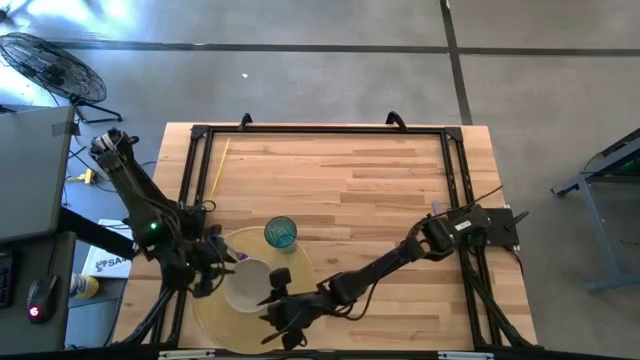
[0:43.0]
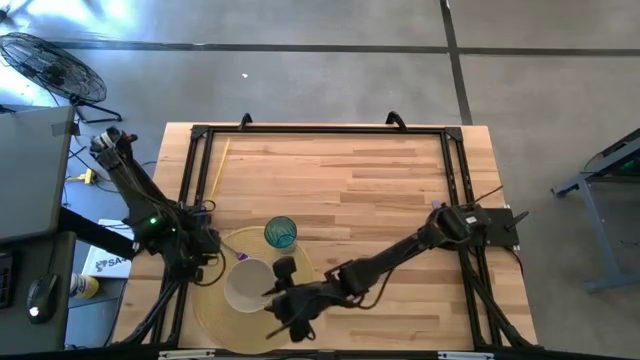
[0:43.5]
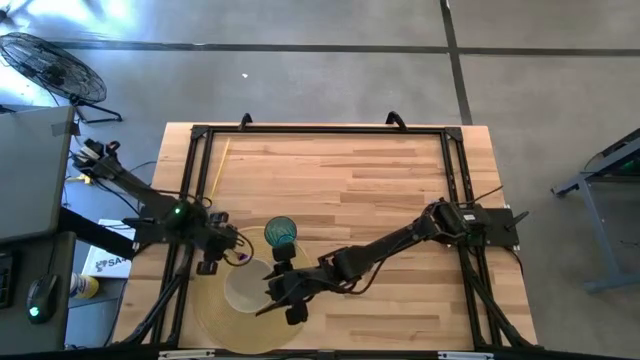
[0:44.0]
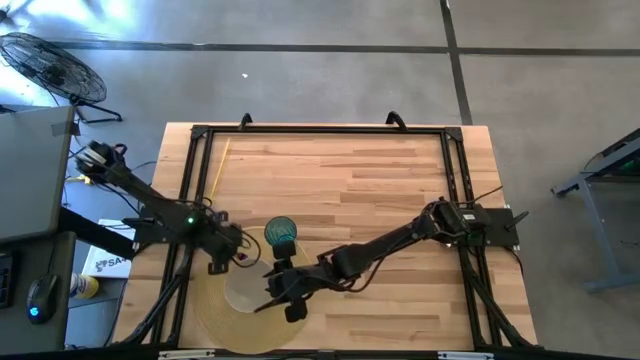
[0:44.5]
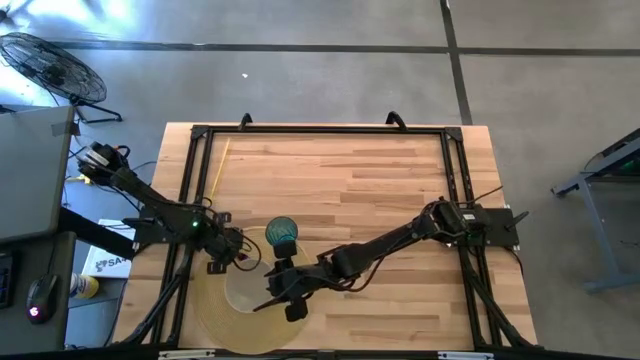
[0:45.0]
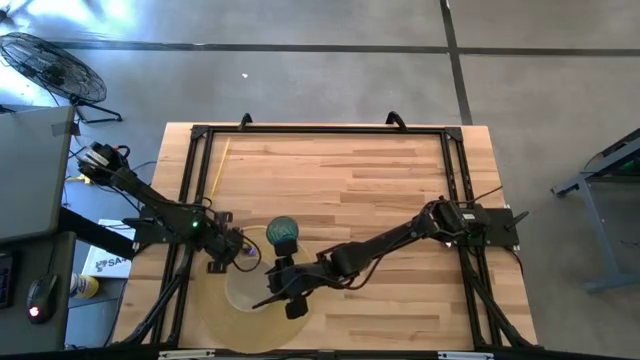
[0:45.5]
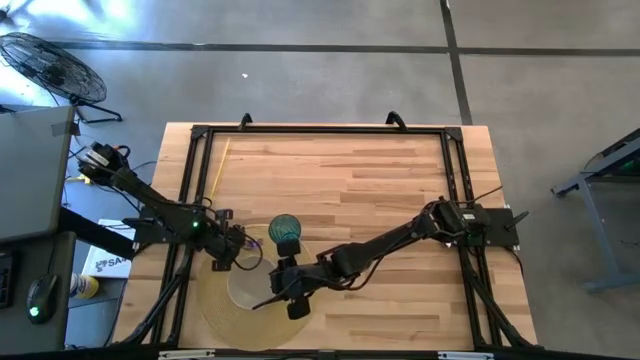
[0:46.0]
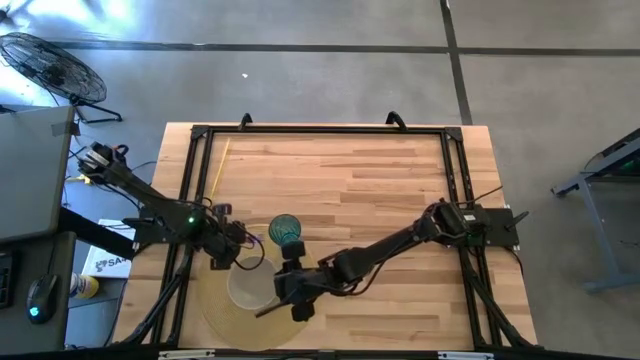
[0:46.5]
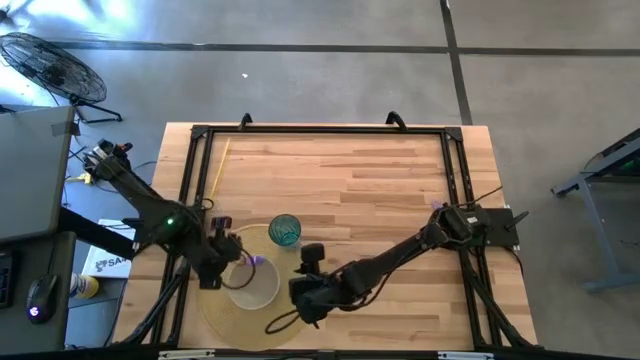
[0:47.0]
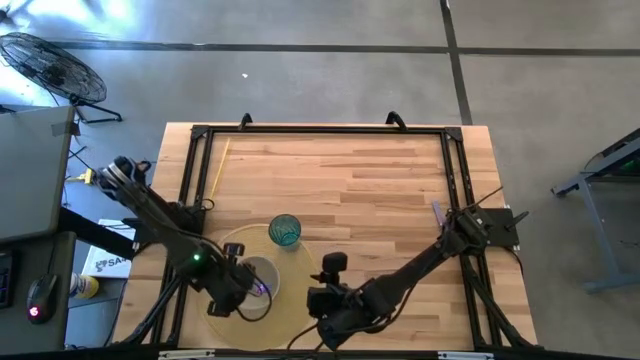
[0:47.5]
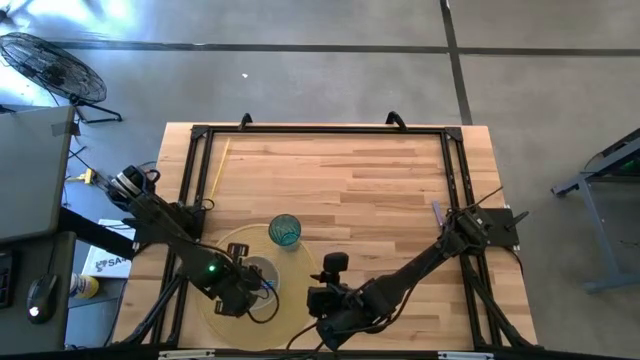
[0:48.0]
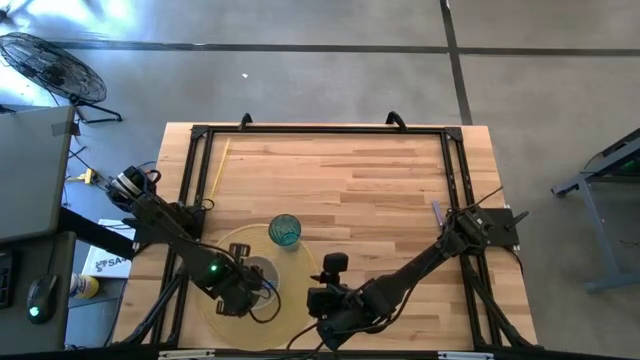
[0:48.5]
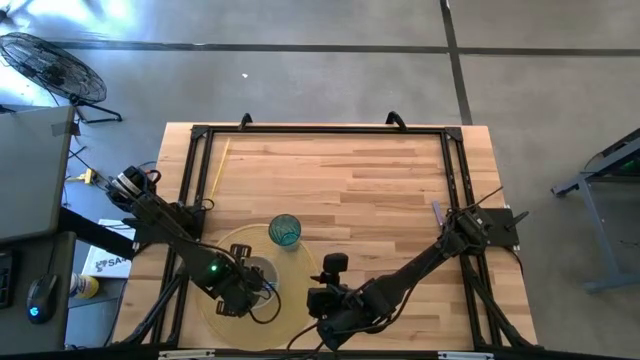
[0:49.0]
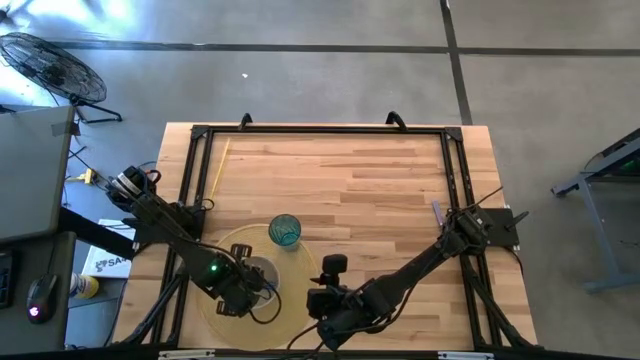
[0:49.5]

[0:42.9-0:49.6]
Task: Pick & Place Utensil
Put the blue fork into the white bowl

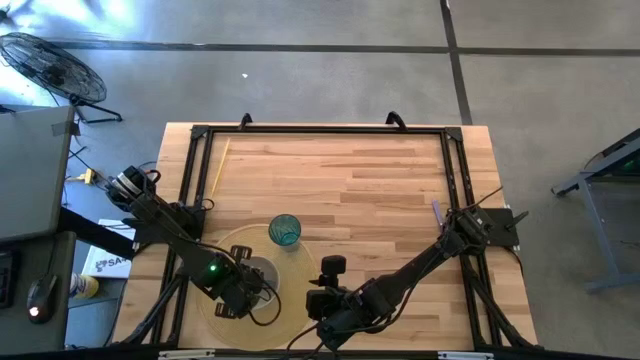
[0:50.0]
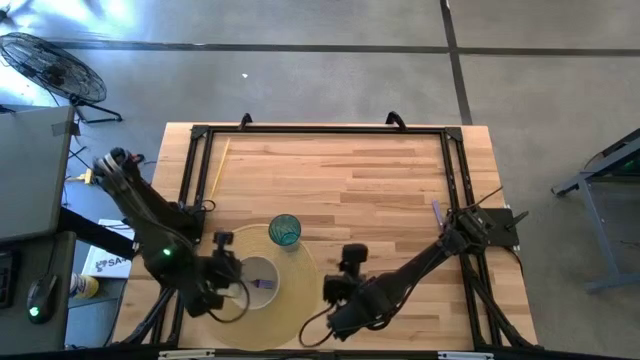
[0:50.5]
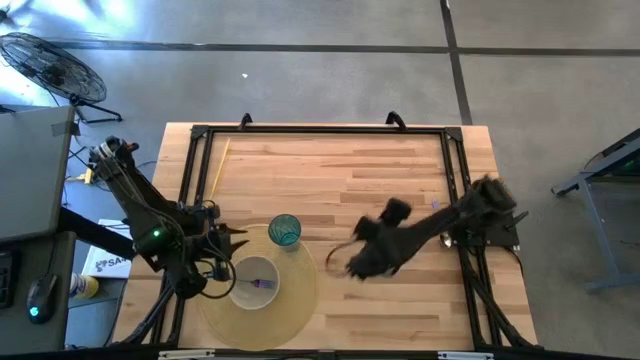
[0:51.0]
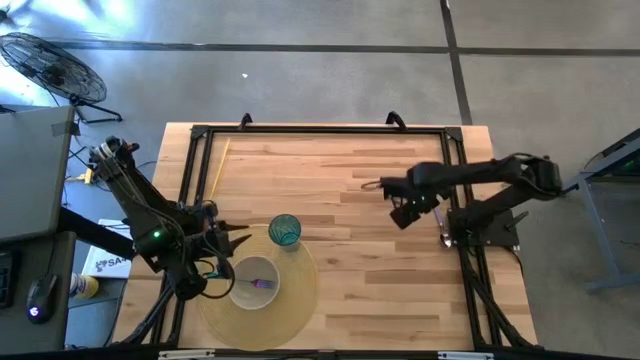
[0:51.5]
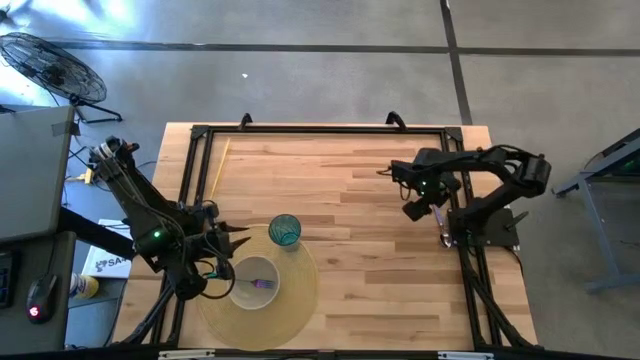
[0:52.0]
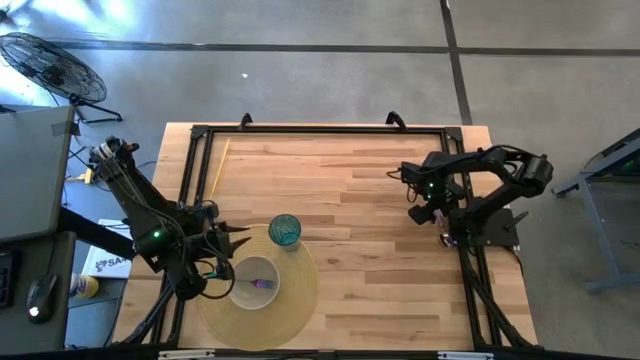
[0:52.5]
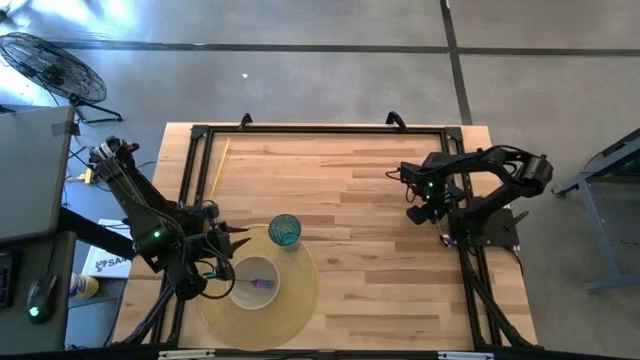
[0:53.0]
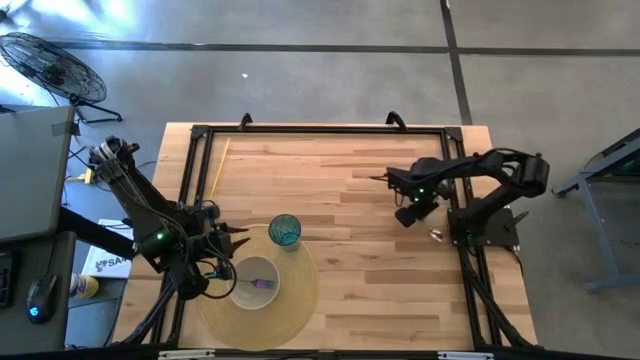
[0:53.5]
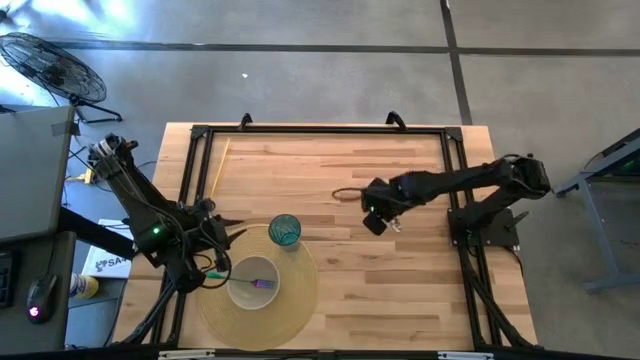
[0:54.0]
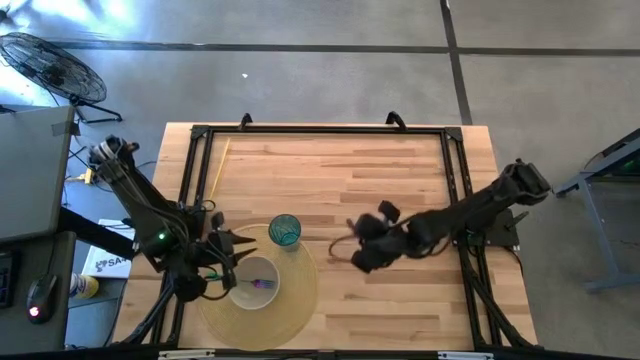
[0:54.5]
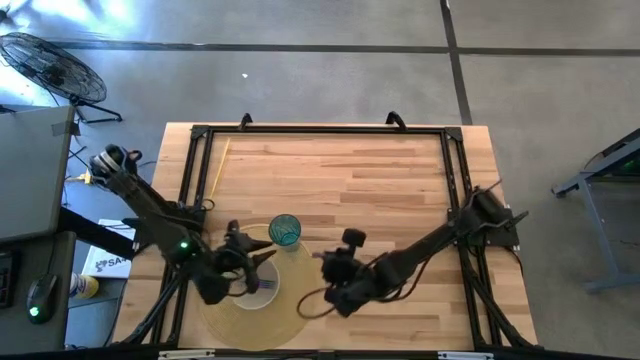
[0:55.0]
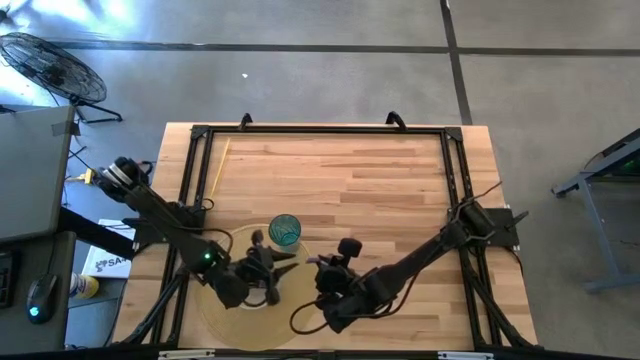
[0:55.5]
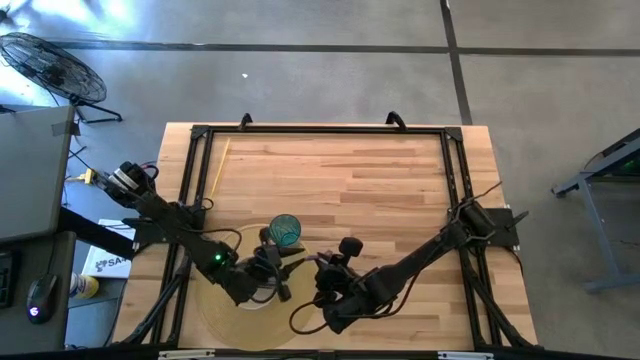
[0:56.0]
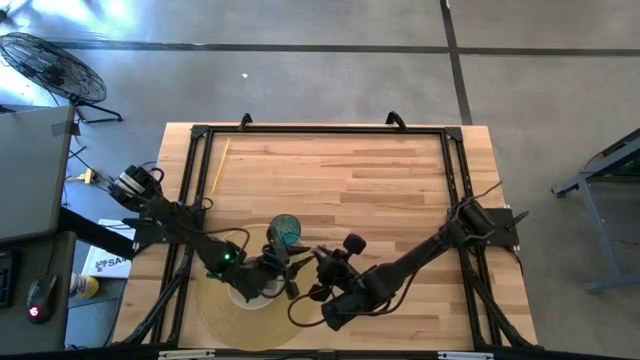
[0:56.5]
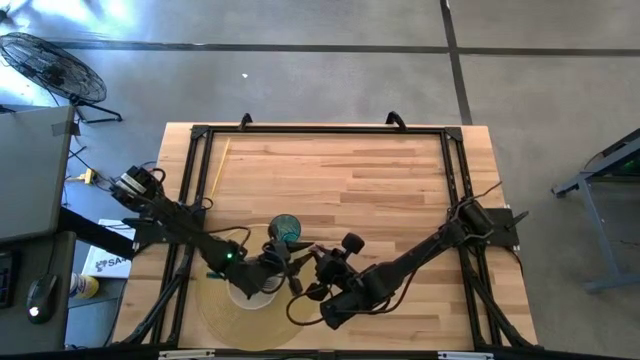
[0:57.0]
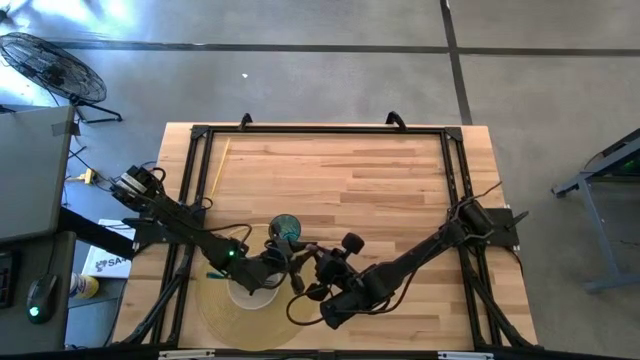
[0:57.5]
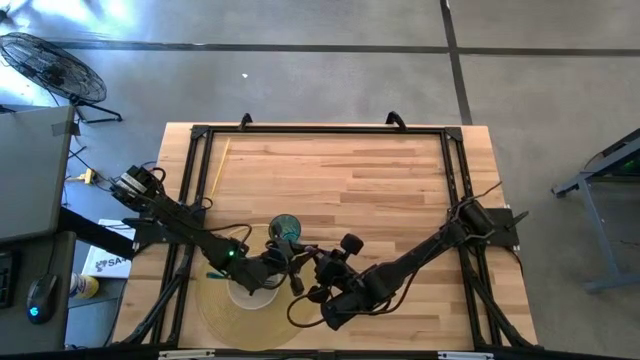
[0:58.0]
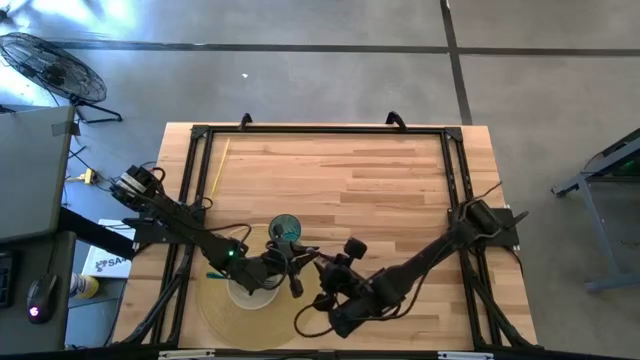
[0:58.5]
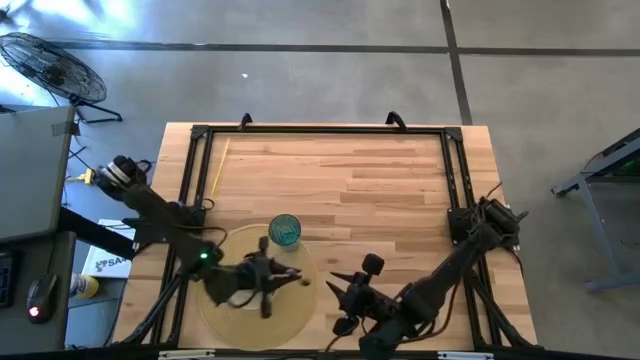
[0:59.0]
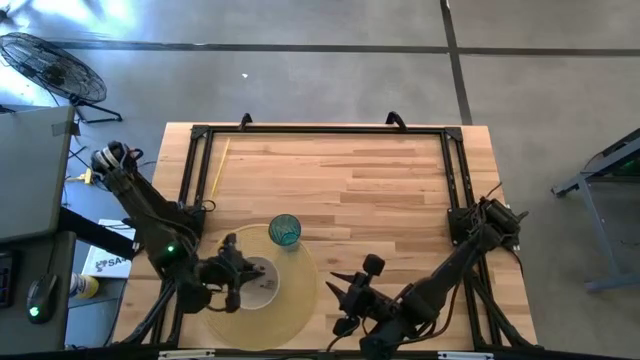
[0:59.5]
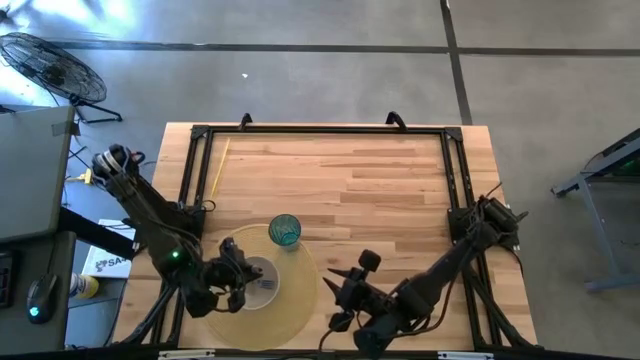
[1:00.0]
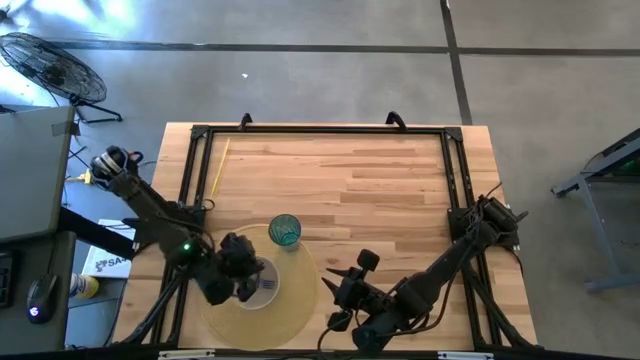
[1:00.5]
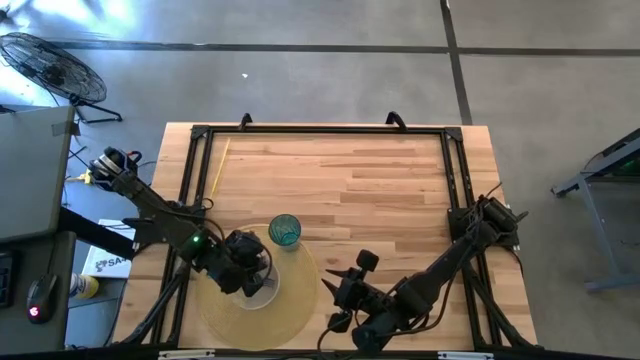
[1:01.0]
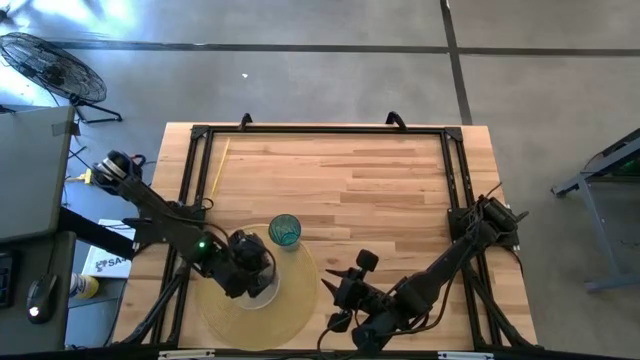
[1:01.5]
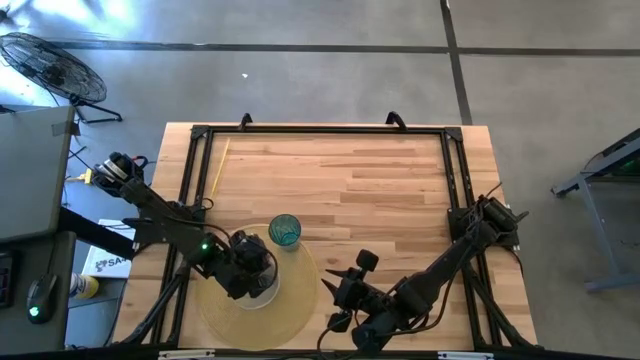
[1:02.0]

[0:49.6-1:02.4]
Put the blue spoon into the white bowl

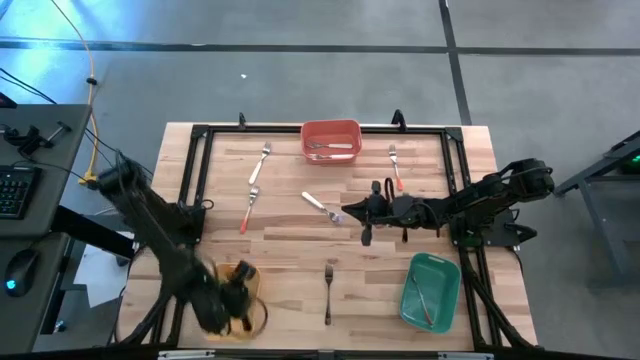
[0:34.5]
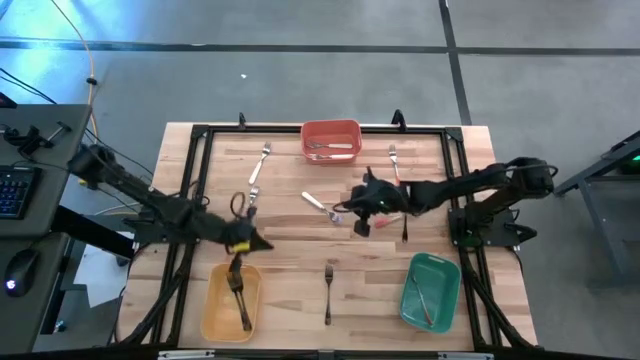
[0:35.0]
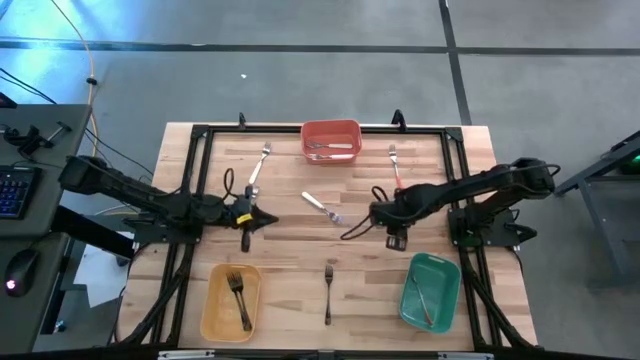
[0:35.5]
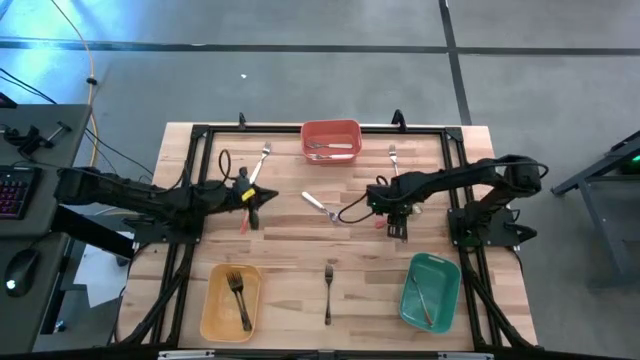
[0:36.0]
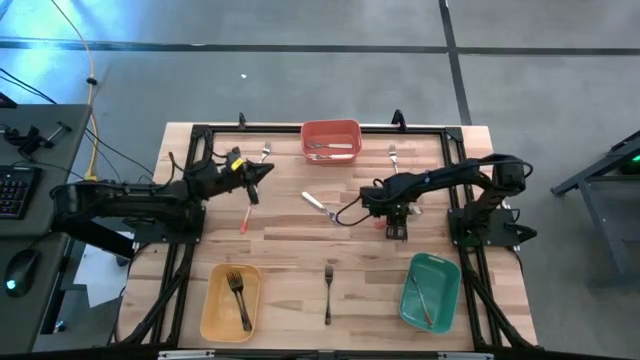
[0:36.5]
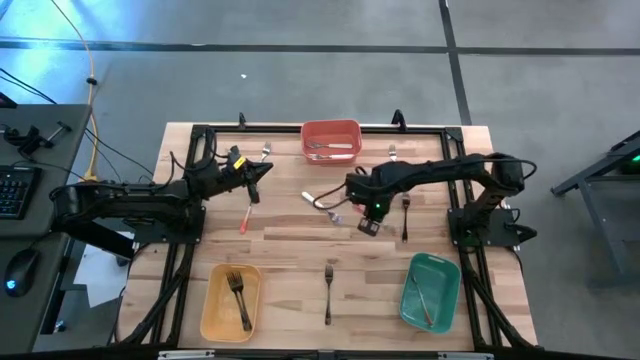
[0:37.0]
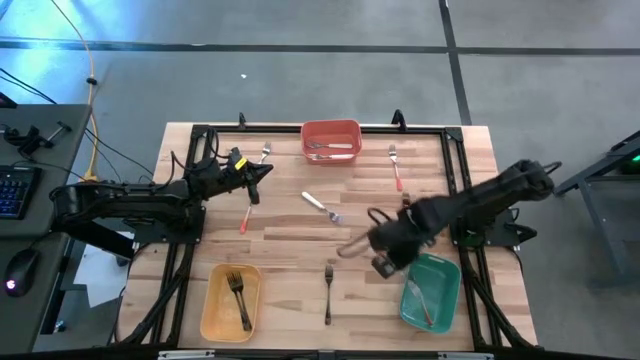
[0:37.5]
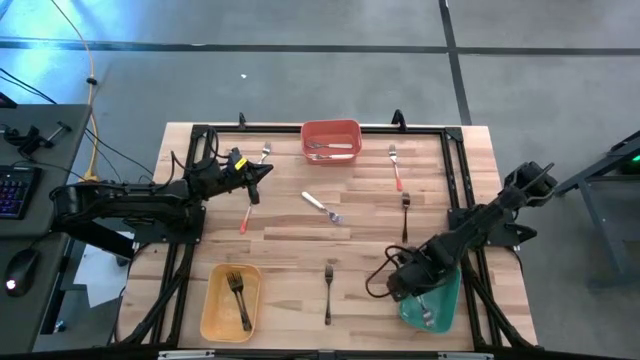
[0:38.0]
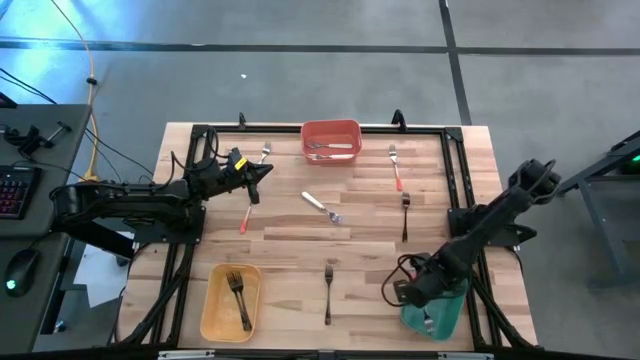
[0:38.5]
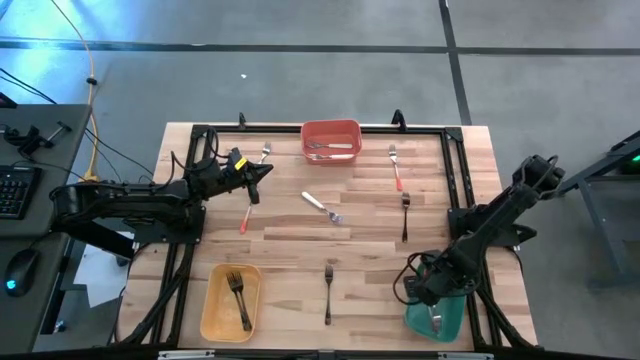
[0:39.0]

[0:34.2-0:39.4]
Task: Sort silverware by color (type)
Put the bottom right orange fork into the green bin
